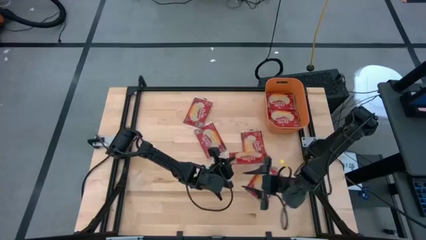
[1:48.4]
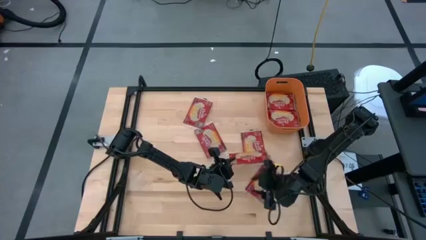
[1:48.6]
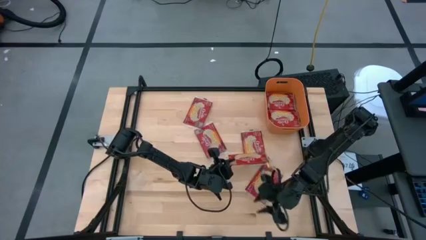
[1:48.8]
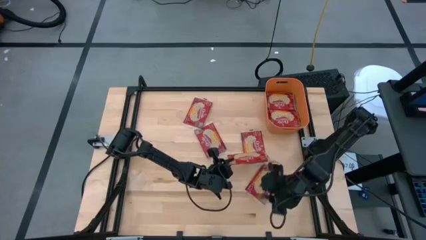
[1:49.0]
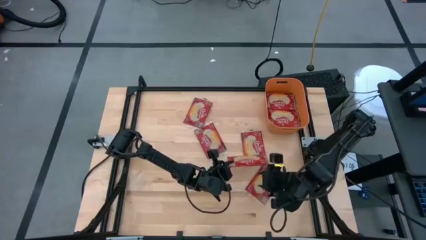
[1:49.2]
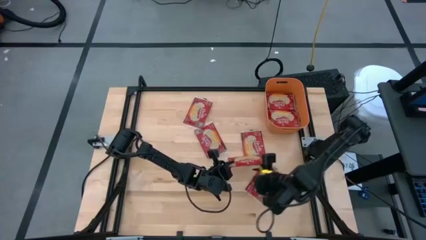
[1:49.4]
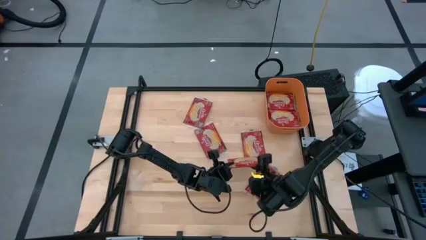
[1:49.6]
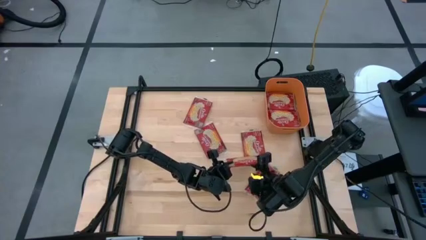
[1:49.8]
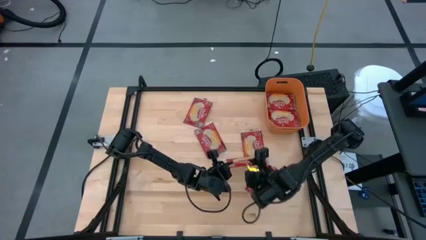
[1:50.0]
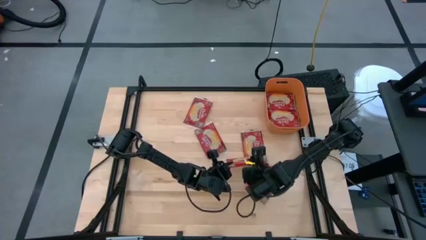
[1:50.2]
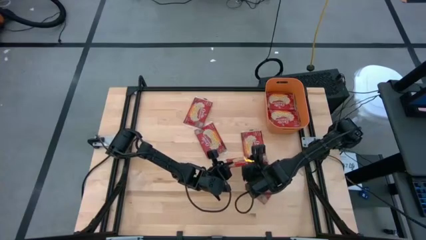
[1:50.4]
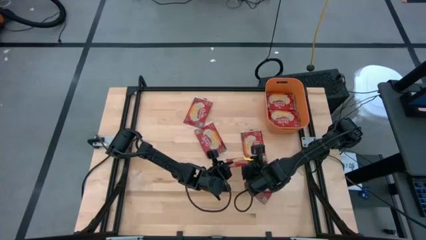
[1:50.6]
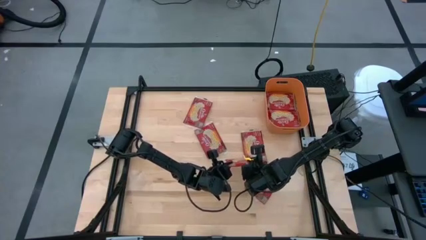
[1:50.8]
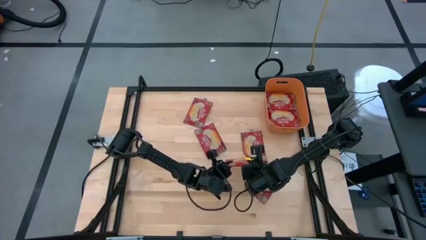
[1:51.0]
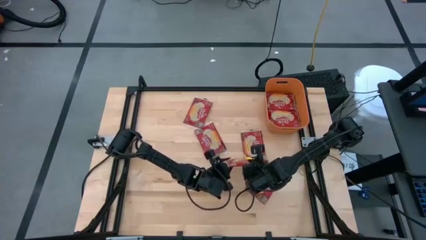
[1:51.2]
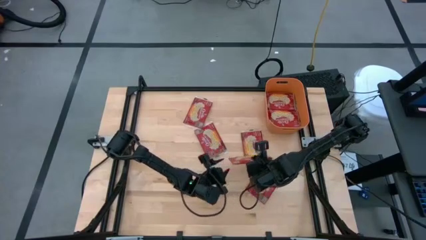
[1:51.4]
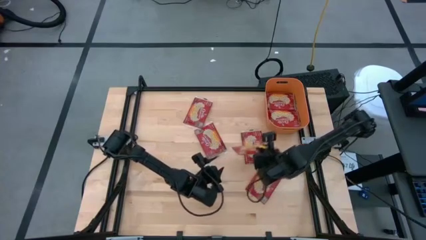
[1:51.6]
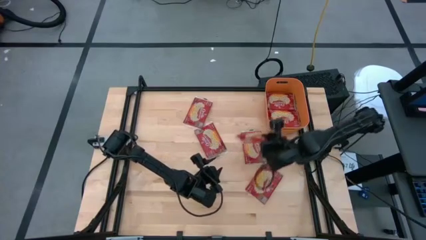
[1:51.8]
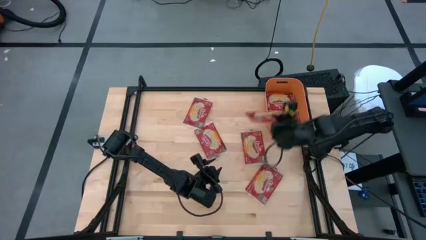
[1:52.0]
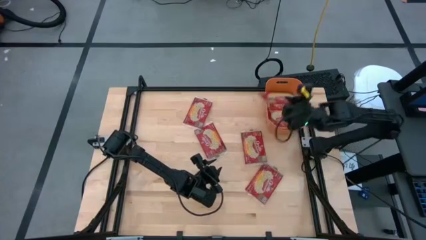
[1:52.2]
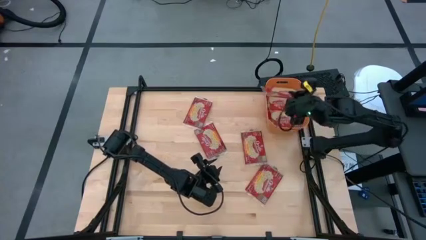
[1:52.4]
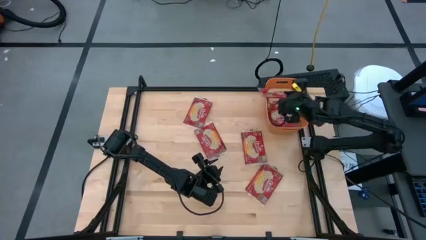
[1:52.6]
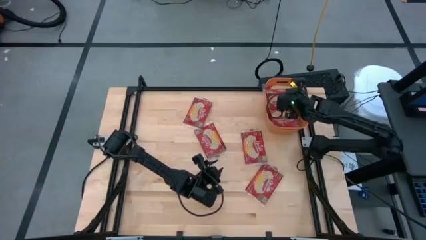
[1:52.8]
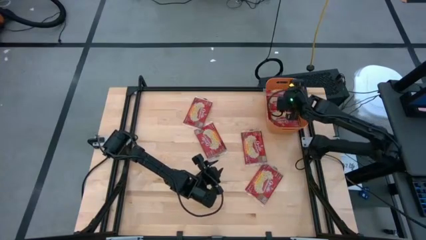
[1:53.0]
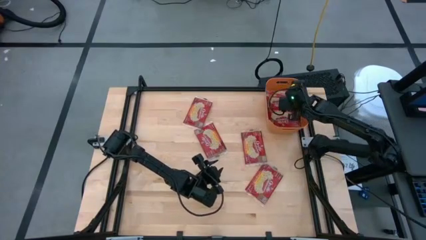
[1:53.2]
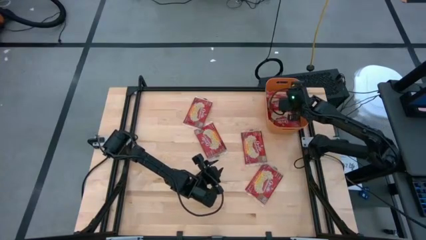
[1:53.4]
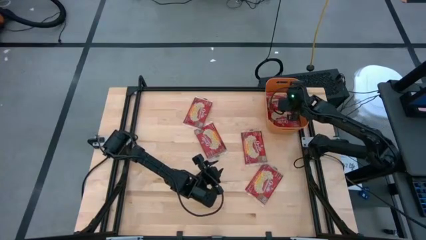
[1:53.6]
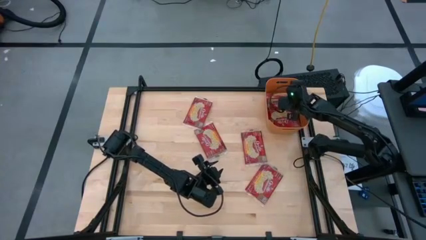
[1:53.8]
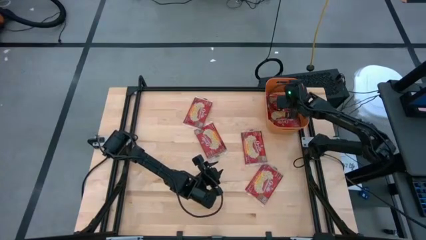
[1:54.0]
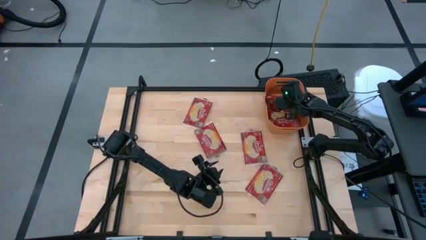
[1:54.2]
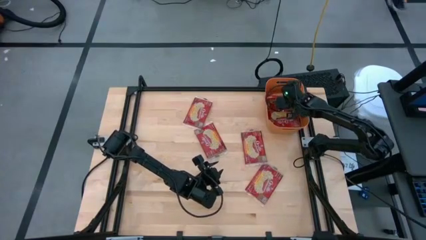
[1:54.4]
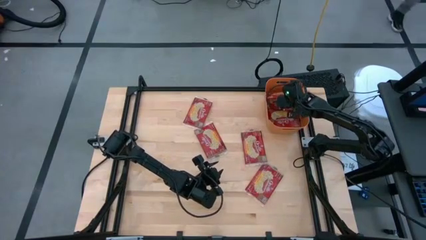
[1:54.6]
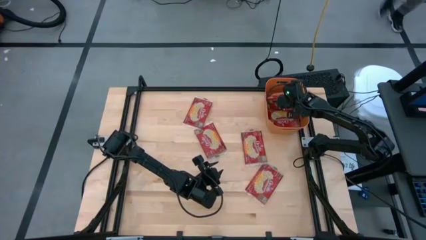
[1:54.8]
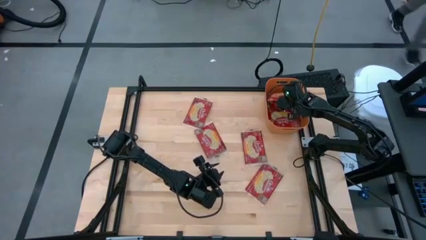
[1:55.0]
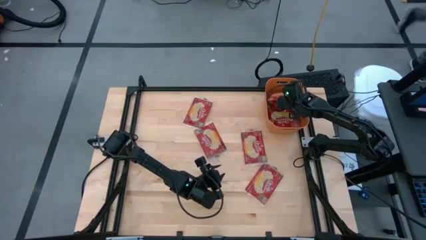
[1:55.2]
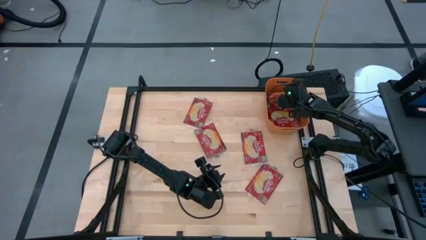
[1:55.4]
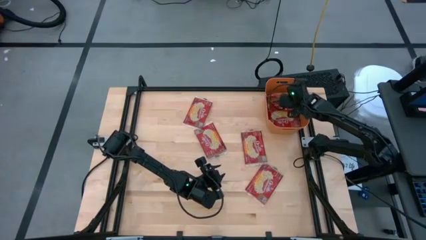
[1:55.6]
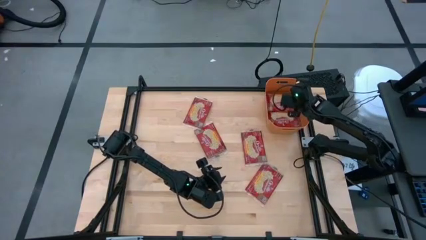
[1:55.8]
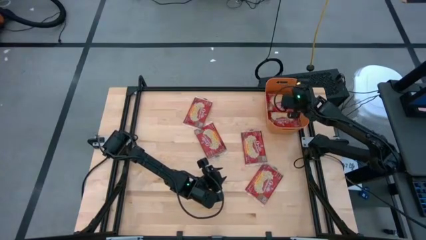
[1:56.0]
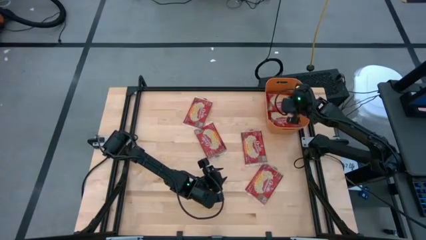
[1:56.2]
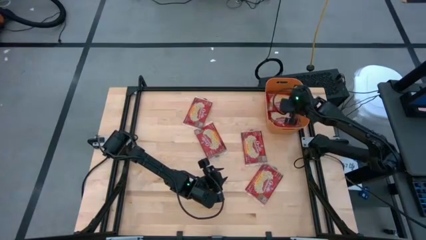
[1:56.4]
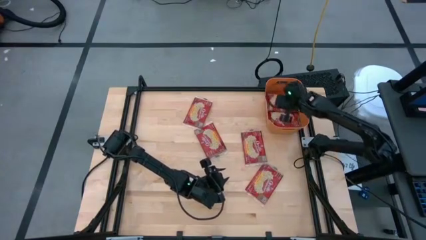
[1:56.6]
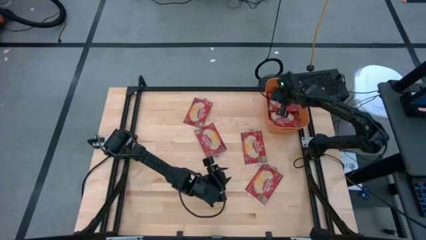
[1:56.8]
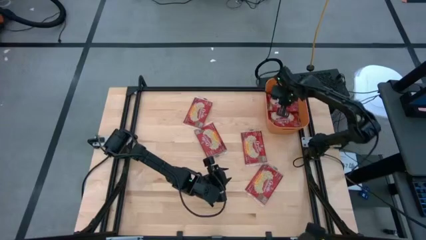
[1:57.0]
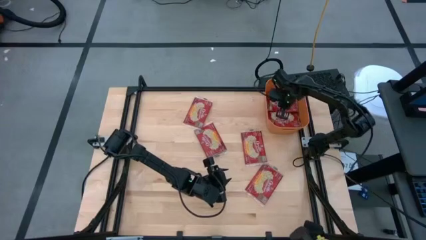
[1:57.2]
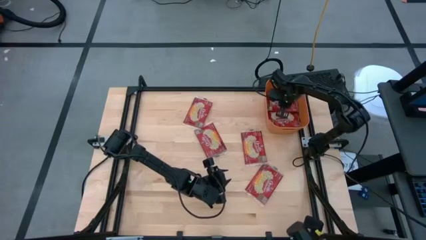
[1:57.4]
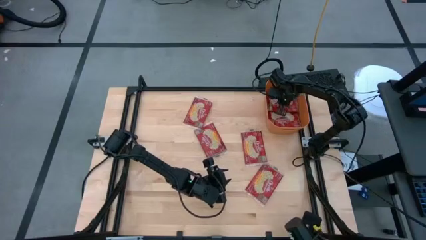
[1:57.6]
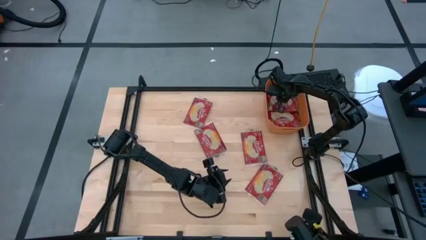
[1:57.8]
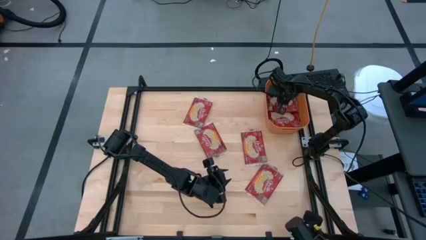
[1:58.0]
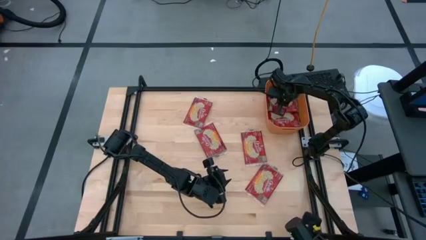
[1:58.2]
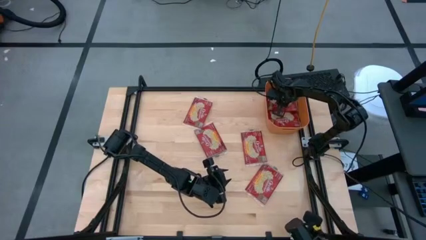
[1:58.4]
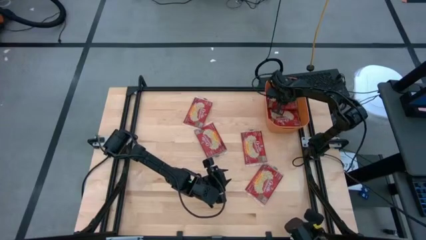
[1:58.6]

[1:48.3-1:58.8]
Task: Sort popcorn bags into baskets
Put the red popcorn bag into the orange container

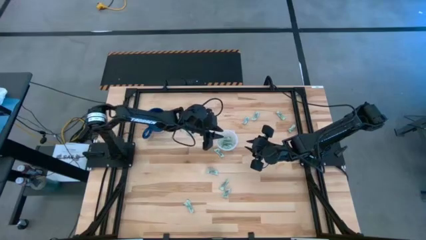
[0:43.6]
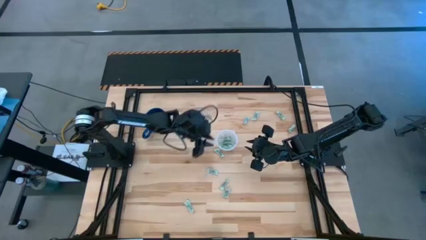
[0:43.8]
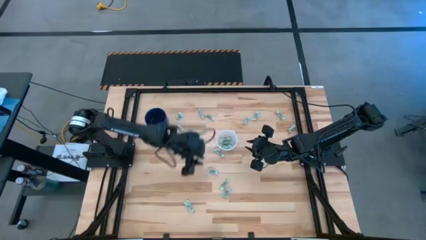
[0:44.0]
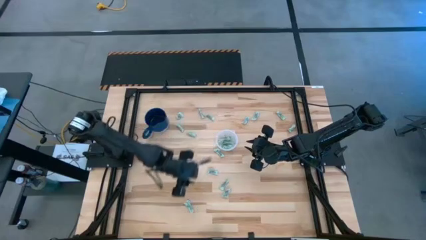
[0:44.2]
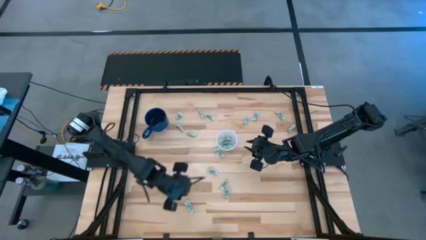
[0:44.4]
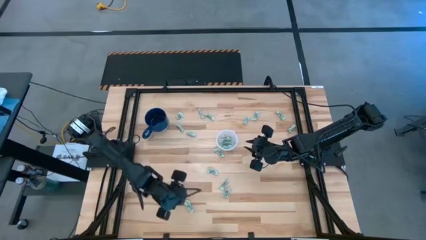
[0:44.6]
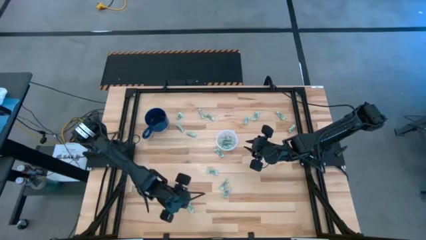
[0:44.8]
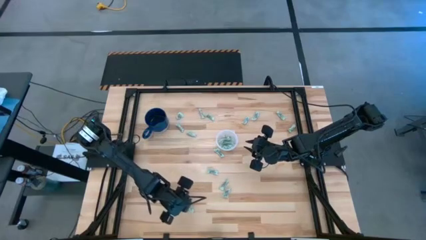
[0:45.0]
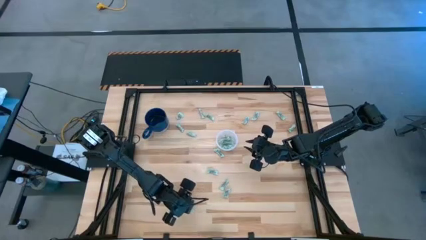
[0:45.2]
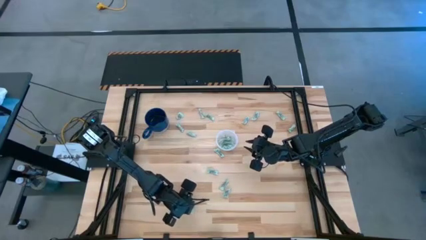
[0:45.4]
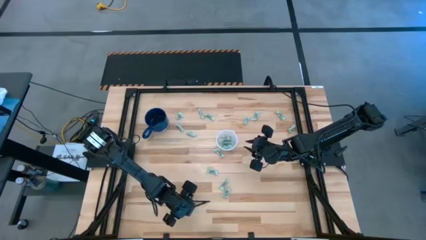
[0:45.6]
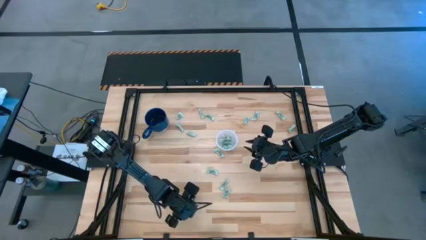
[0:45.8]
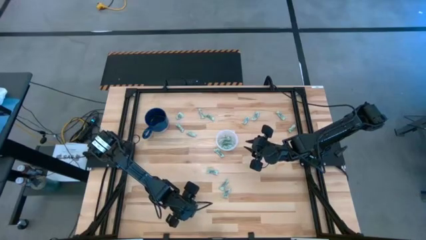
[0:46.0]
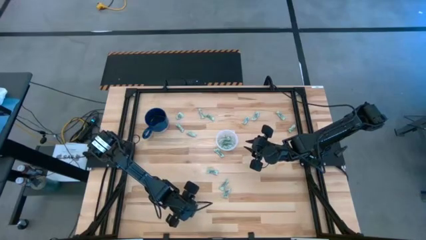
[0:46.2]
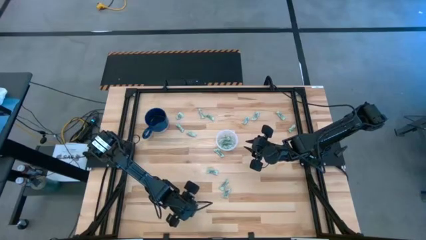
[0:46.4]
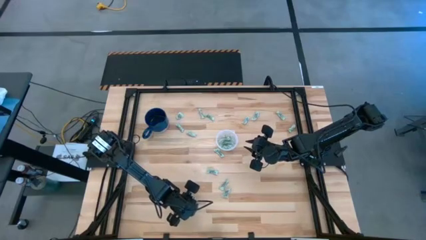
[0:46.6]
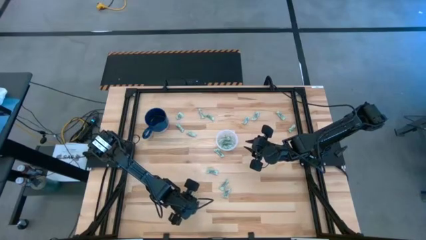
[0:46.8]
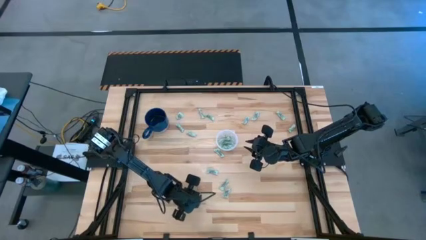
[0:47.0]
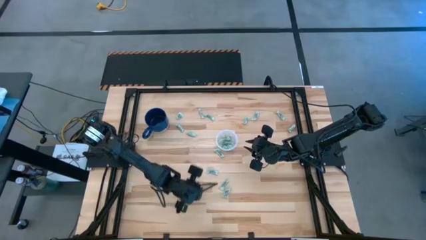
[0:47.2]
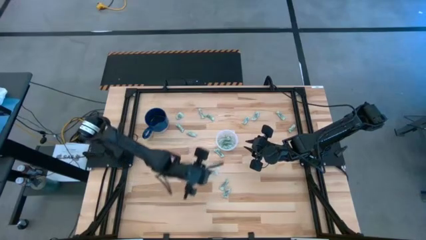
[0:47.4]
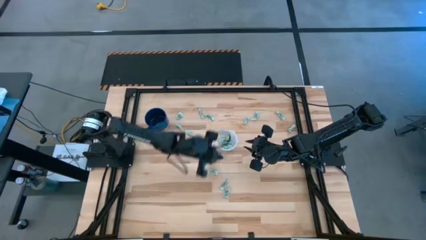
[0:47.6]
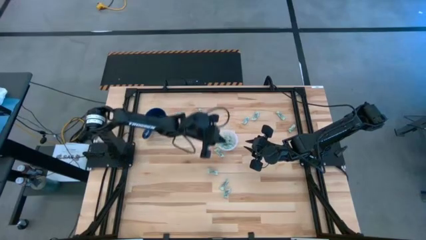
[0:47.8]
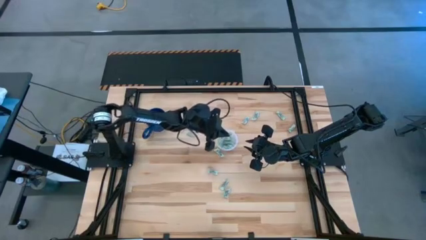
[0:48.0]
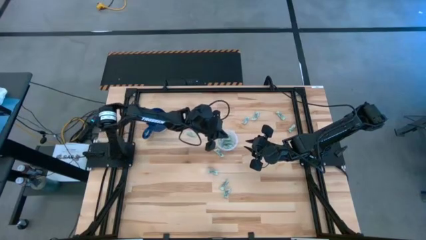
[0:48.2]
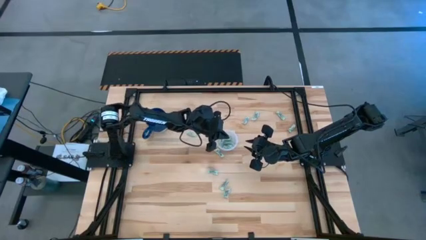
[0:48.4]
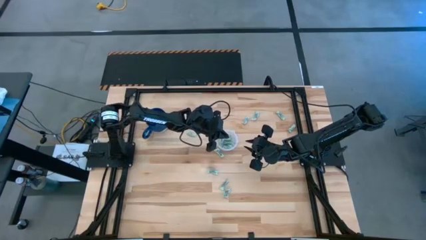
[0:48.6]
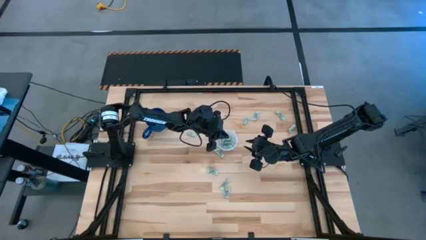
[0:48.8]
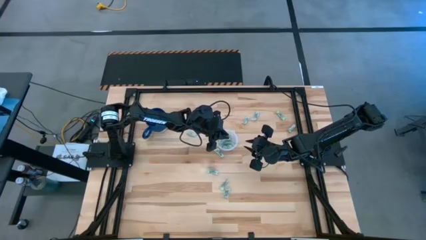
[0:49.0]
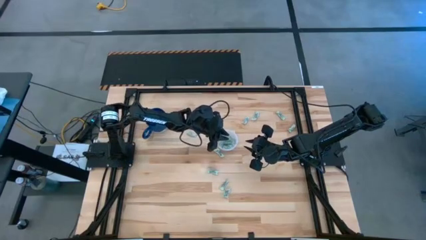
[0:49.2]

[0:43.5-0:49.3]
Task: Pick and place items into bin
Put the gray stevia packet into the transparent bin
